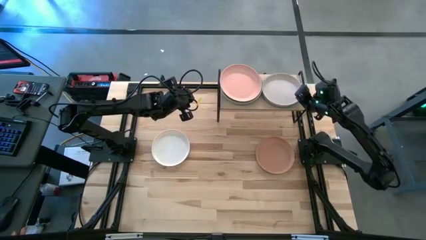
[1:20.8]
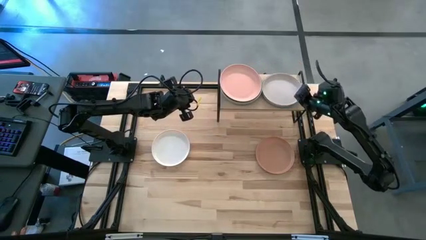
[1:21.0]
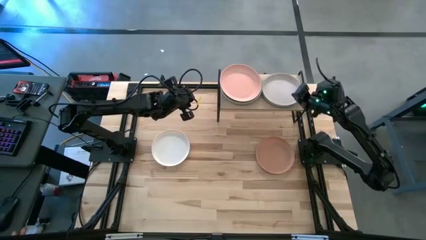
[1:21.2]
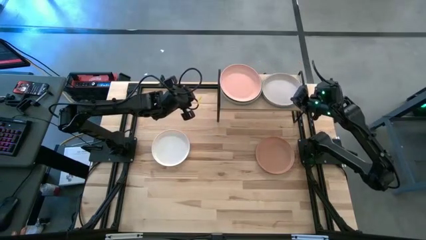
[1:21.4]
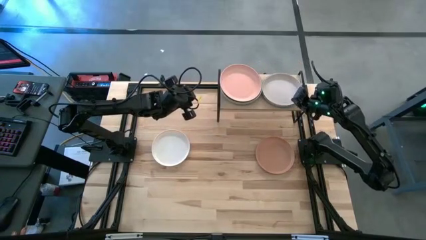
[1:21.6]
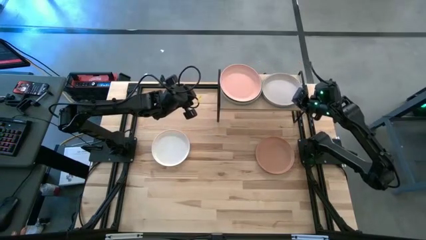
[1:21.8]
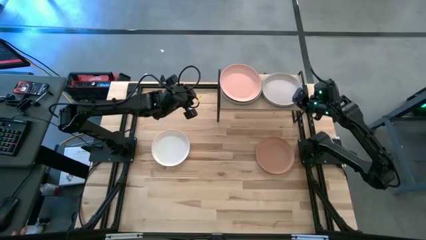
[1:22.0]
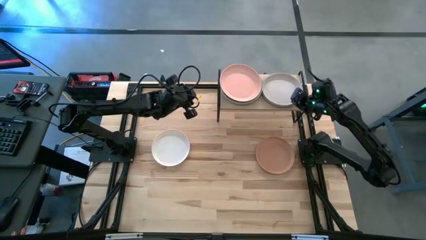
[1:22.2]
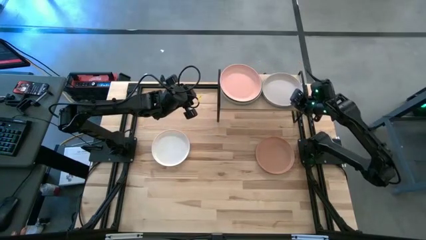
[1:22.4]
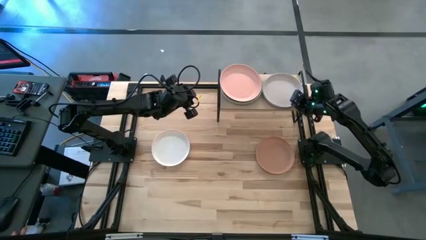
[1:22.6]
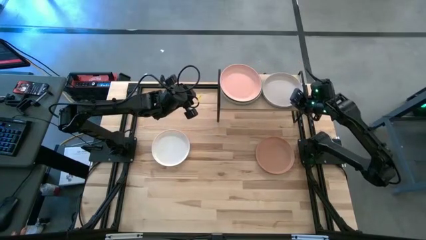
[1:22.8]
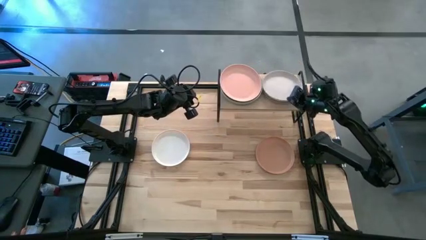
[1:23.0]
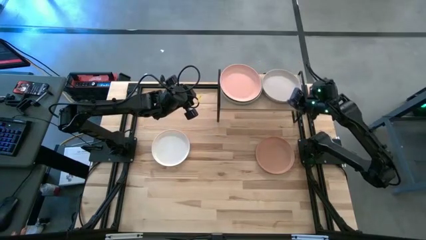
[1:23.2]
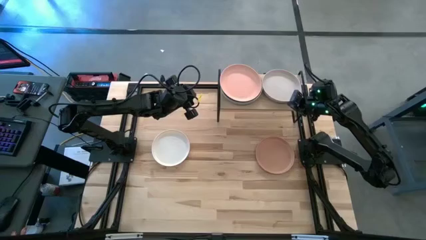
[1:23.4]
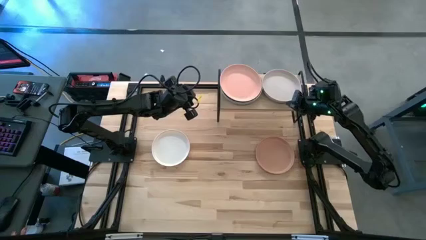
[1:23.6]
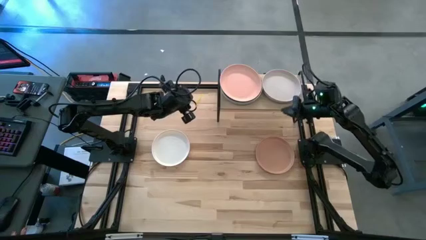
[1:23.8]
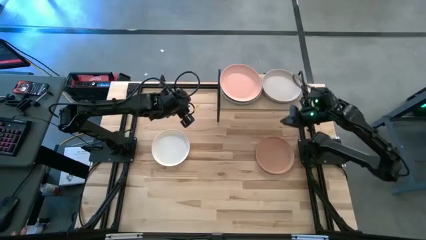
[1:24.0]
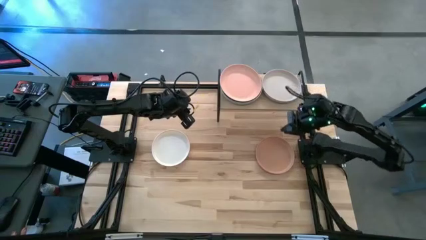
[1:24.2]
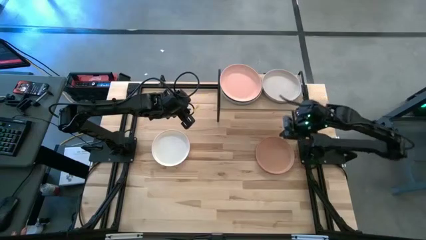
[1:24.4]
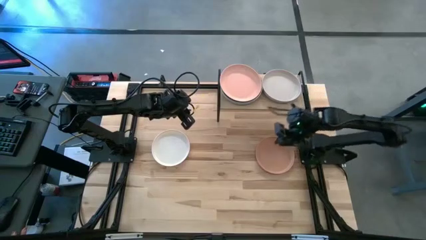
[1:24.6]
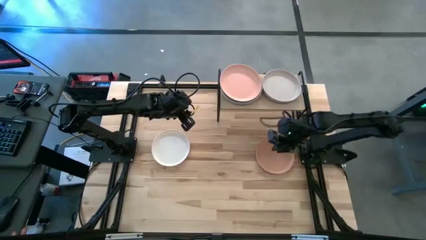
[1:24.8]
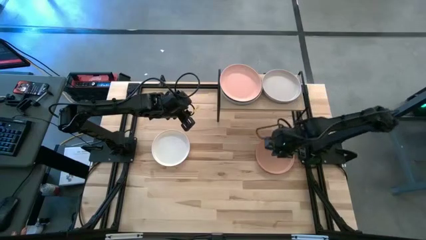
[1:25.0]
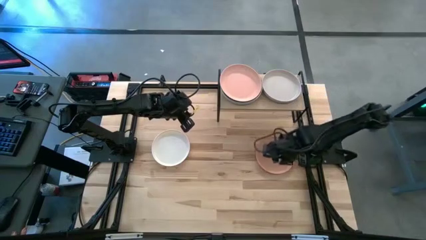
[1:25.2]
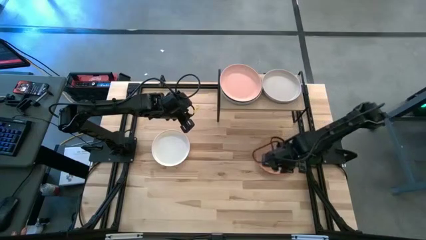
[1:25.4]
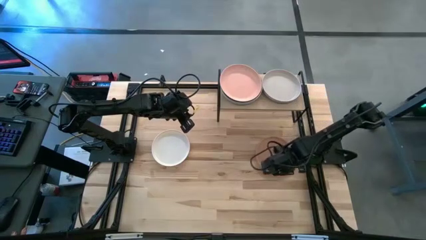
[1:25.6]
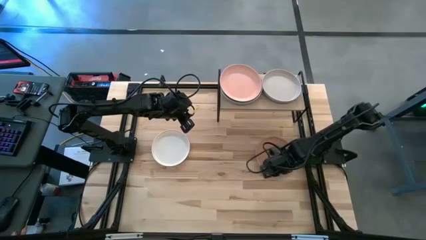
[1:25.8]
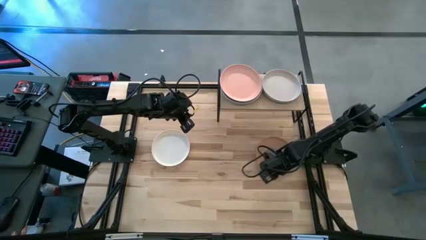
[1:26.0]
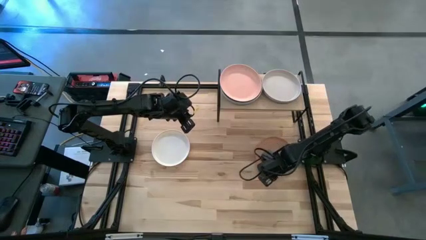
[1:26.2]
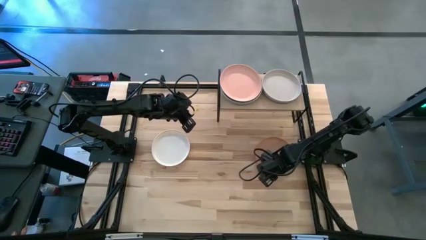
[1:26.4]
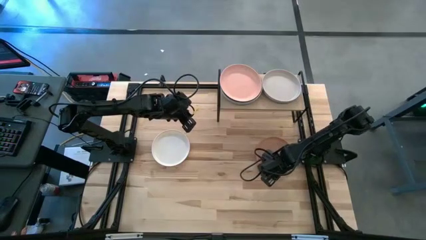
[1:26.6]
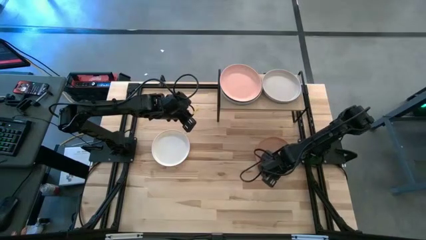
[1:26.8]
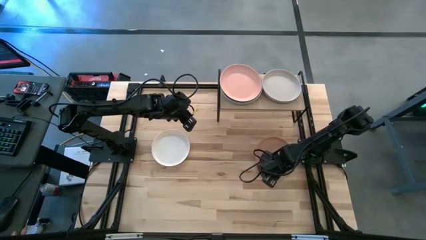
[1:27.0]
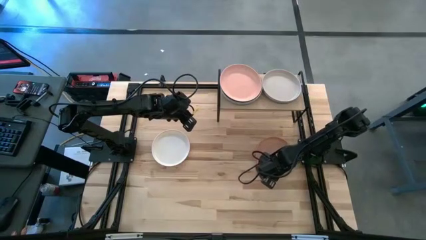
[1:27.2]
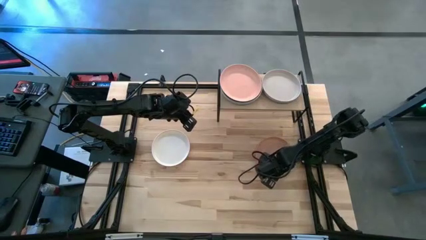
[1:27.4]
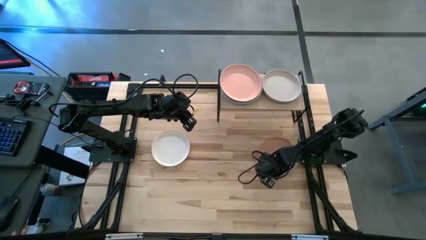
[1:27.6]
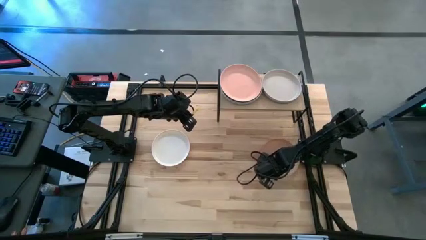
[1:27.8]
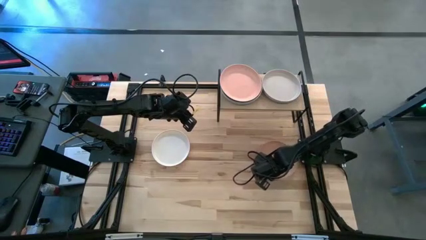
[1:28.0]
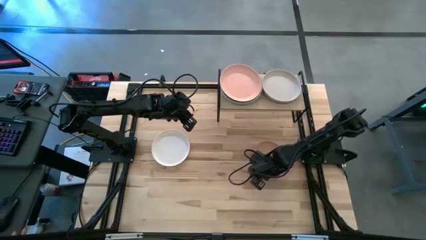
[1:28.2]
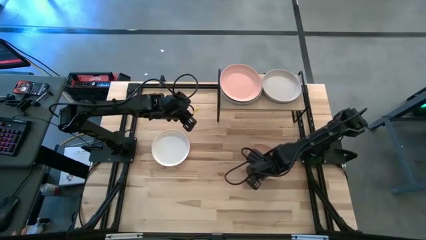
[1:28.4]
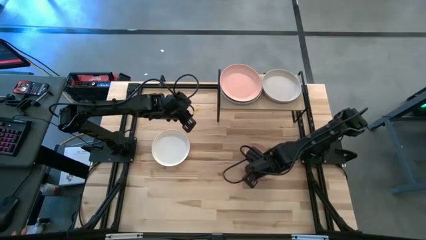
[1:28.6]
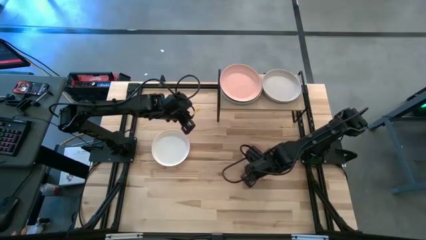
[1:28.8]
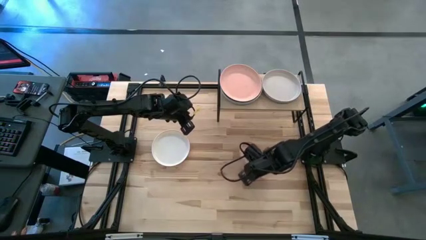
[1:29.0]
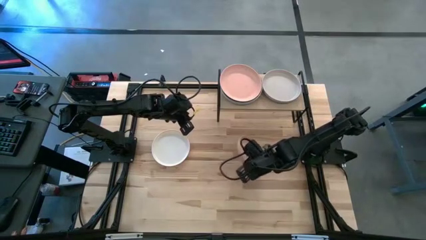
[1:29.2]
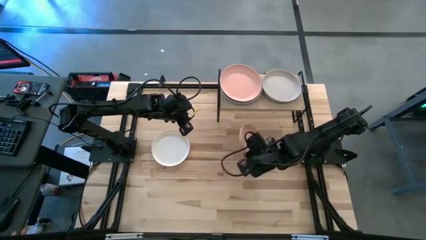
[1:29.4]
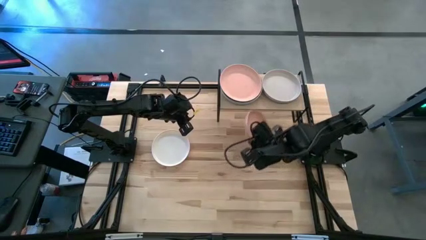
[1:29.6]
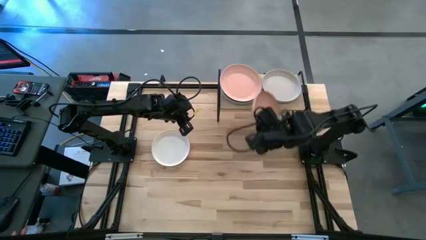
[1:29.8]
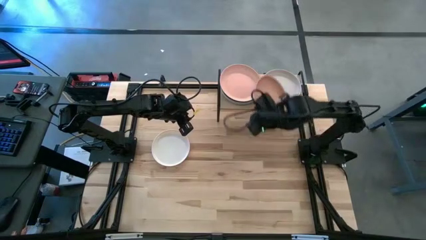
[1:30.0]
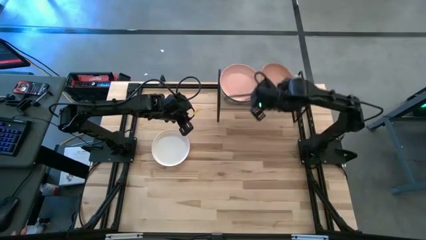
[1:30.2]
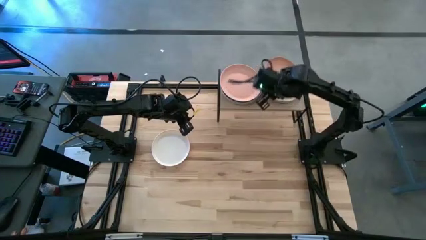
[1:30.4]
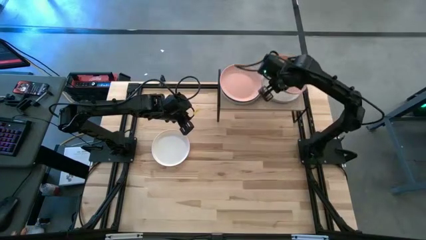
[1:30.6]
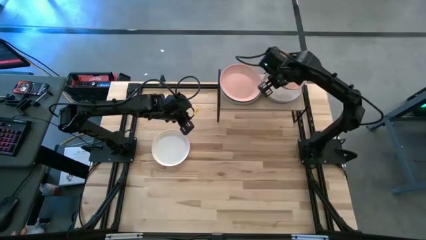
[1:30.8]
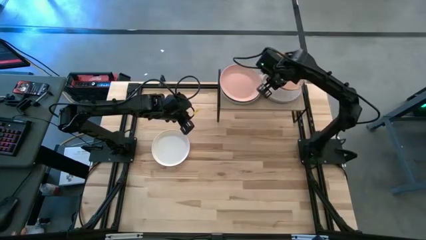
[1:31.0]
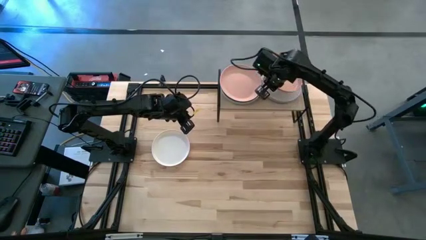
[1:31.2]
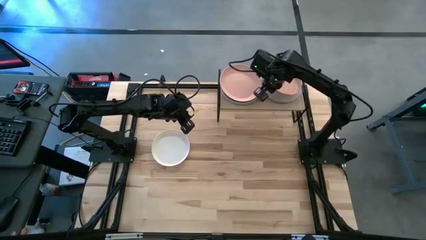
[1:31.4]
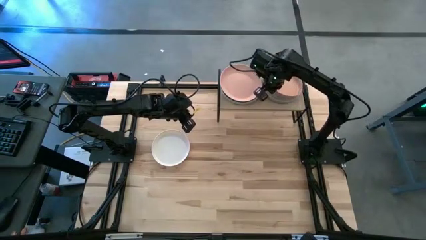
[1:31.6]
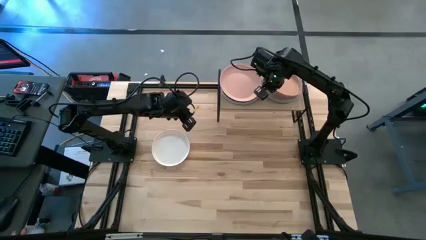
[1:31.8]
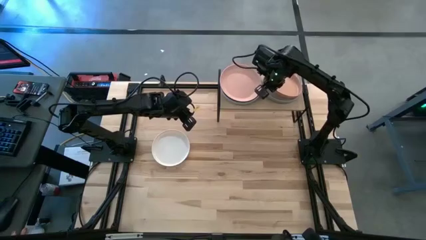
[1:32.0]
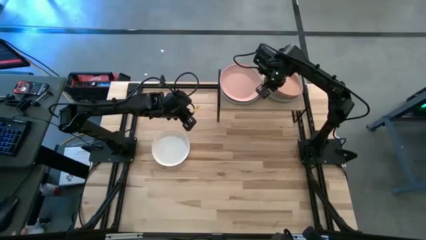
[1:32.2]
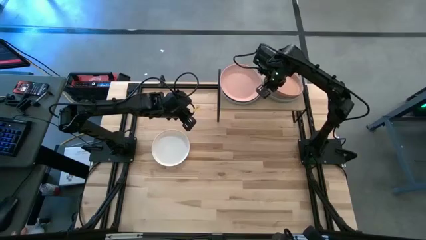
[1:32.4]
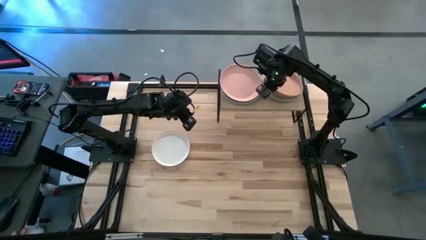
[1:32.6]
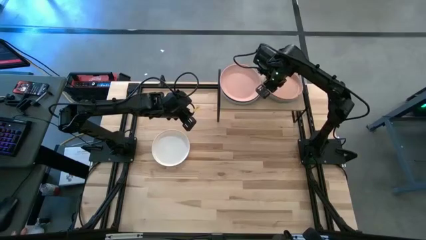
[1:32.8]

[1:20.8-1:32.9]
Task: Place and stack plates onto a shelf
Stack the brown plate on top of the white plate on the shelf

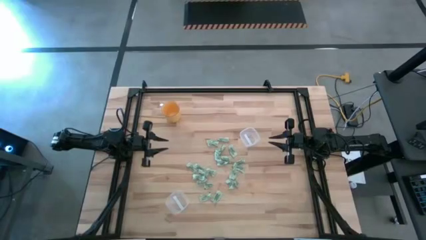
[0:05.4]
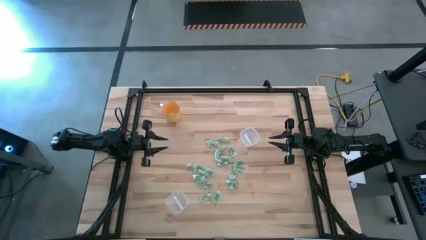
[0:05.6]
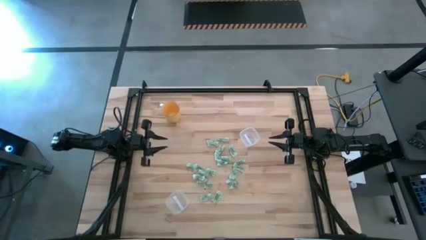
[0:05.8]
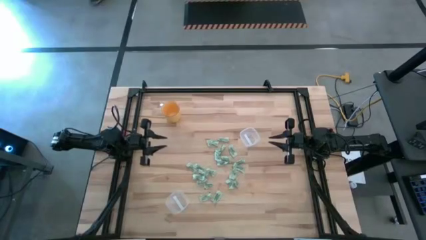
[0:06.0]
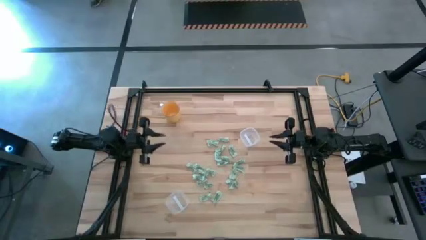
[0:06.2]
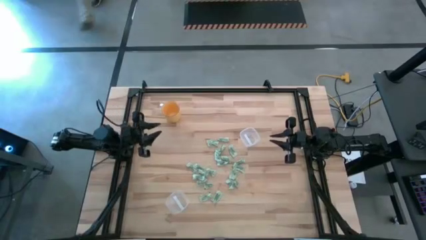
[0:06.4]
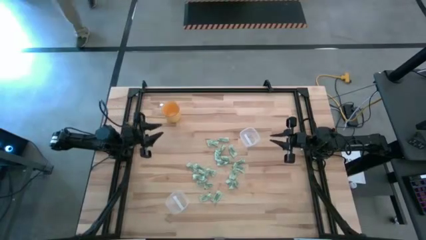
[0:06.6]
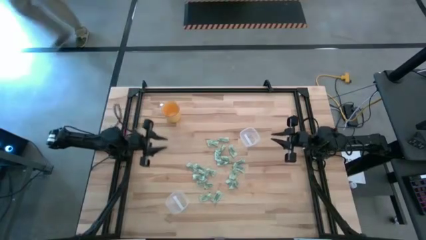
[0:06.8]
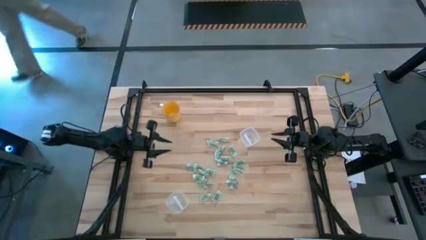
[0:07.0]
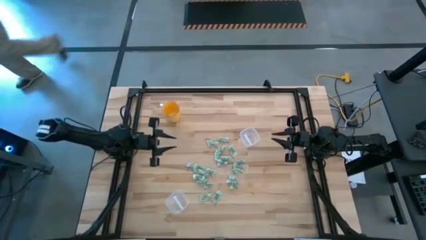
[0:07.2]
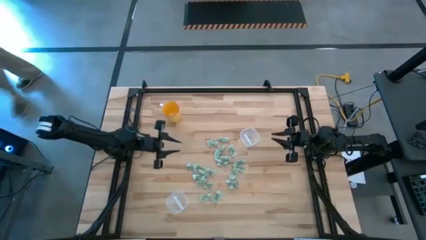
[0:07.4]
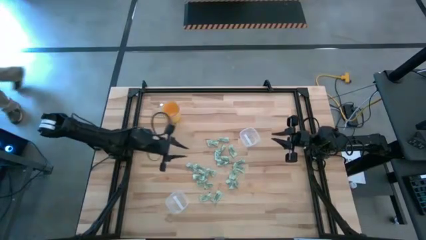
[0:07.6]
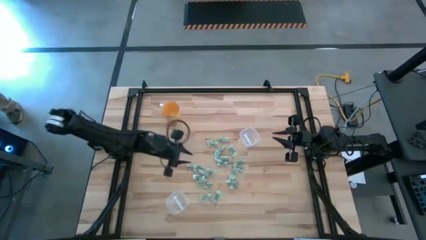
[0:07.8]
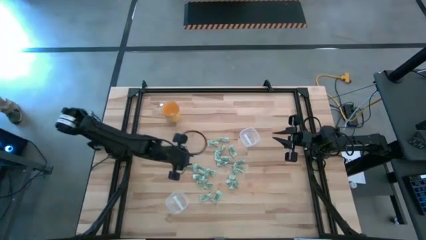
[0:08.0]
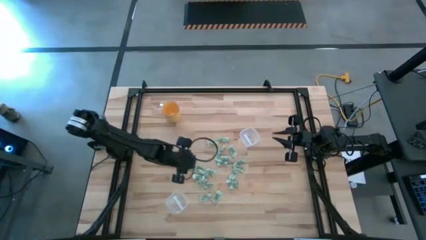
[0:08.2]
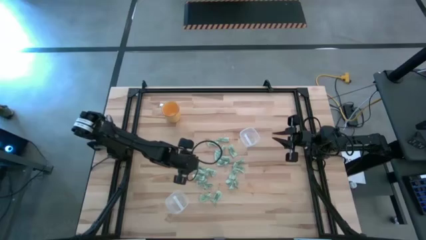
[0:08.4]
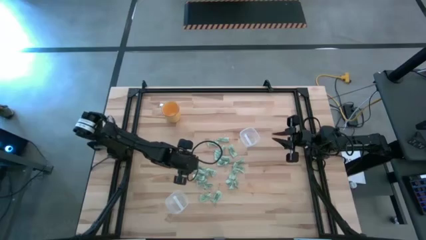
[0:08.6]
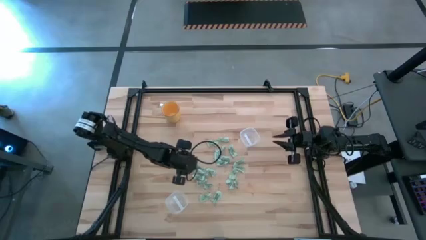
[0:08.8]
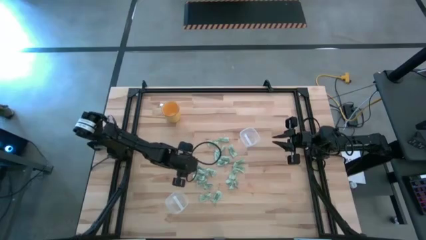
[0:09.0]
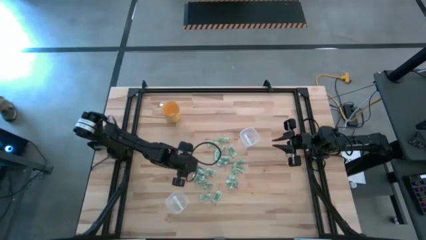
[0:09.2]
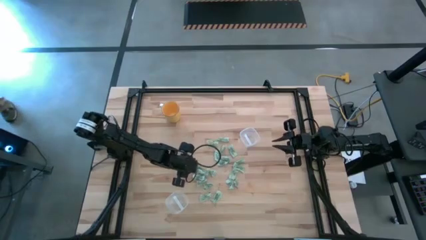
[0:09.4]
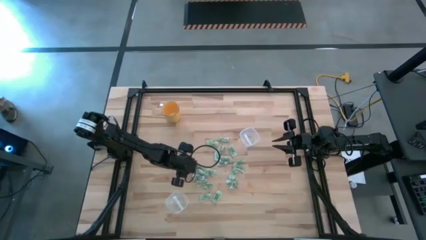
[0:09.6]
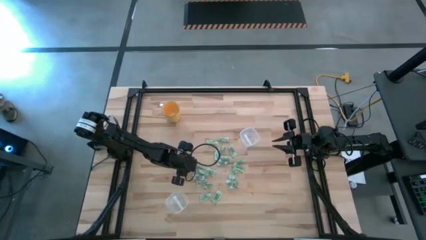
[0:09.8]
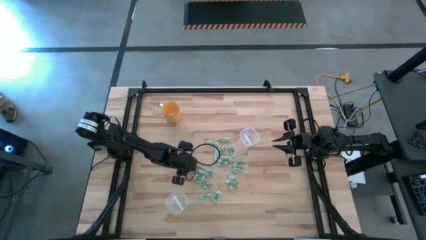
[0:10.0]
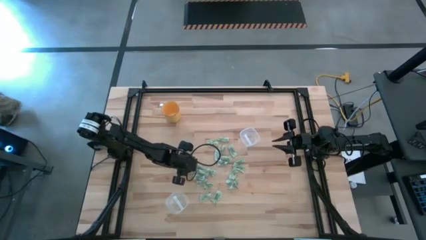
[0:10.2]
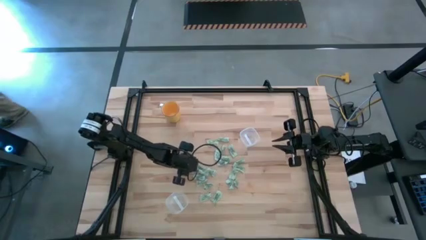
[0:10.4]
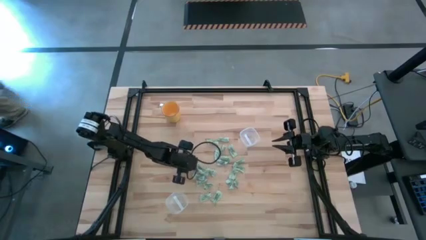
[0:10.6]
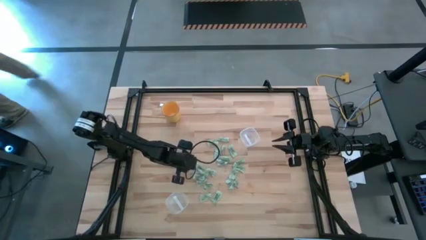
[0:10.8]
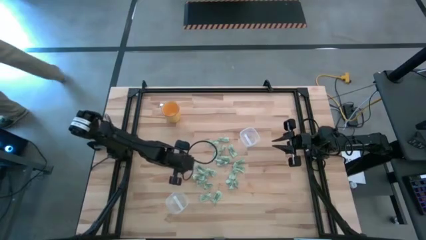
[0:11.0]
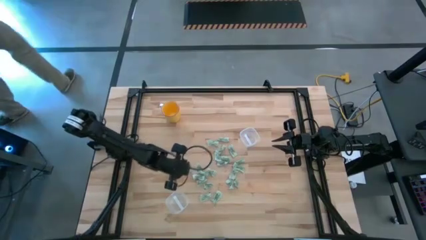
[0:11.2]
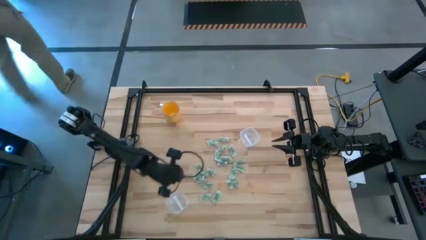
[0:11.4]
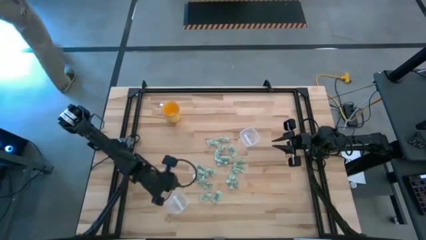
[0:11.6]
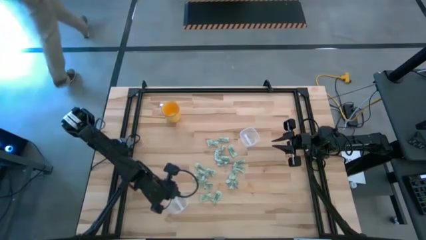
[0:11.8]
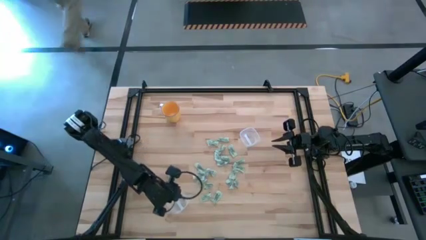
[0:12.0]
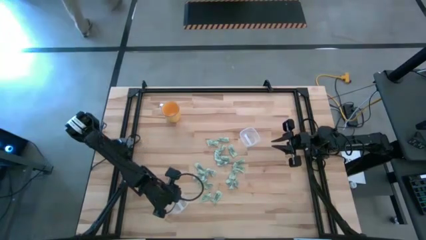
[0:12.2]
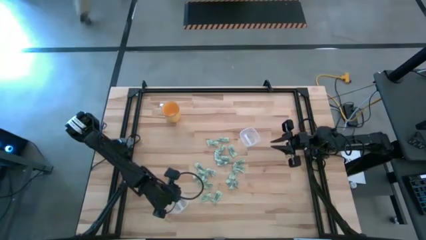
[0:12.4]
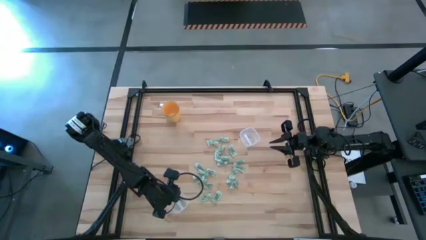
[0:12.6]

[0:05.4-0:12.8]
Task: Pick and place Stevia / Truvia into bins
Put the green stevia packet into the bottom transparent container
